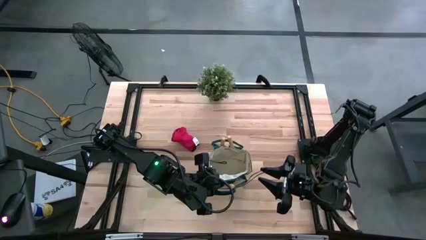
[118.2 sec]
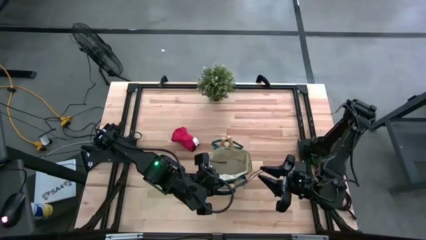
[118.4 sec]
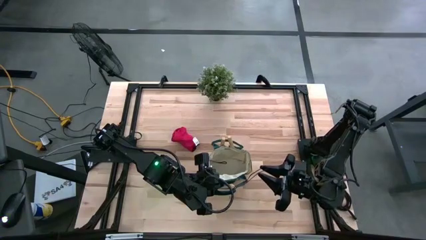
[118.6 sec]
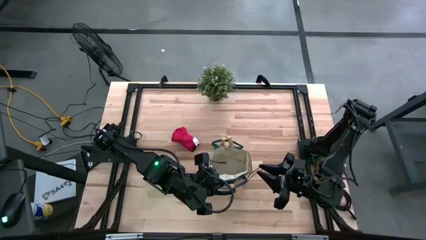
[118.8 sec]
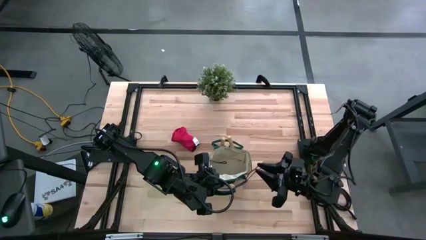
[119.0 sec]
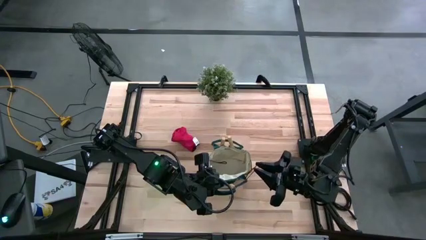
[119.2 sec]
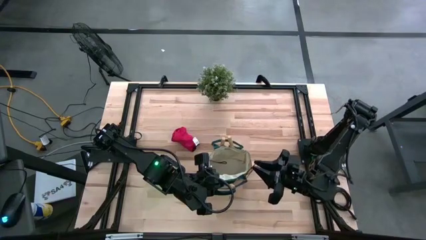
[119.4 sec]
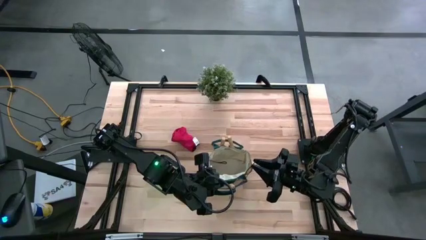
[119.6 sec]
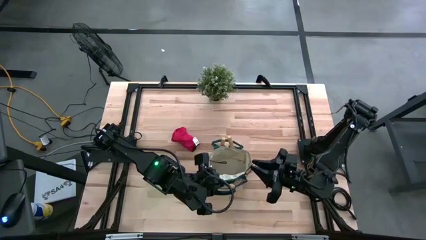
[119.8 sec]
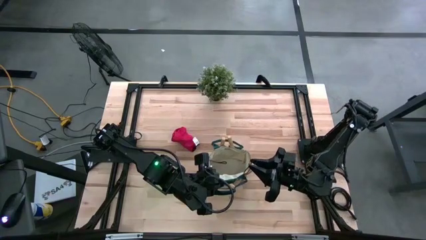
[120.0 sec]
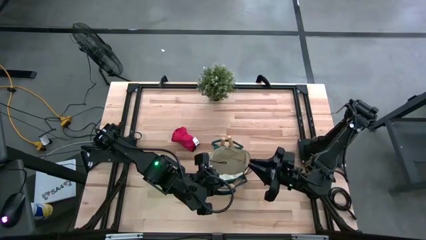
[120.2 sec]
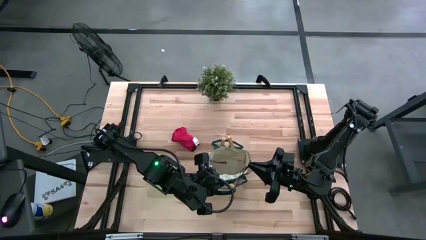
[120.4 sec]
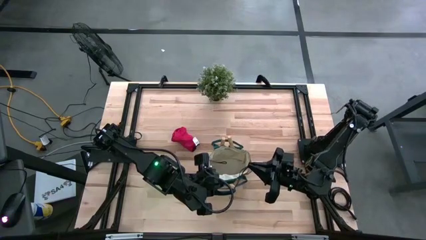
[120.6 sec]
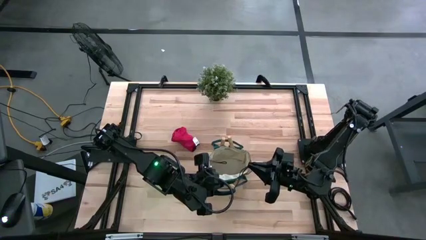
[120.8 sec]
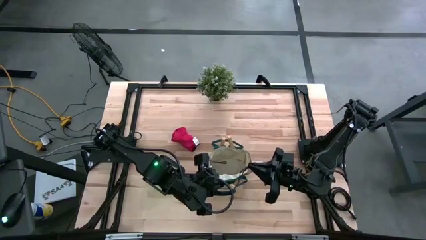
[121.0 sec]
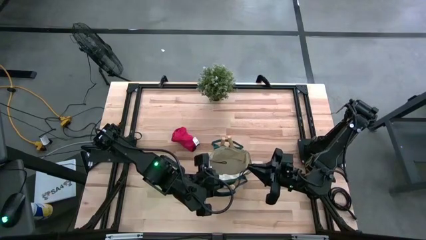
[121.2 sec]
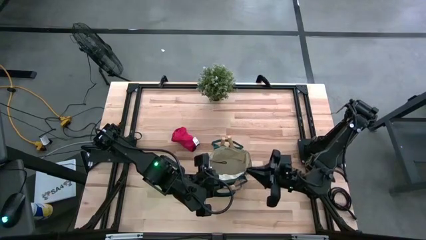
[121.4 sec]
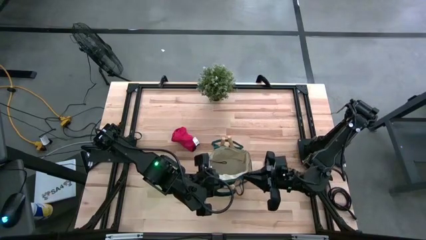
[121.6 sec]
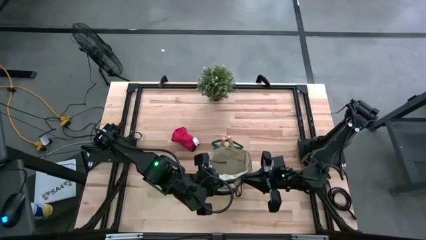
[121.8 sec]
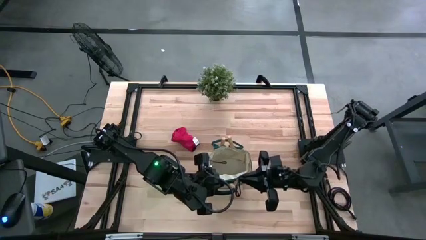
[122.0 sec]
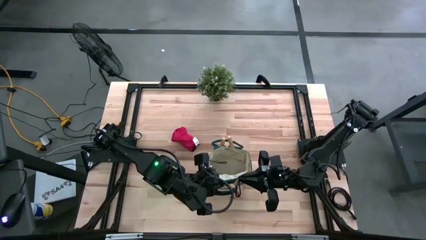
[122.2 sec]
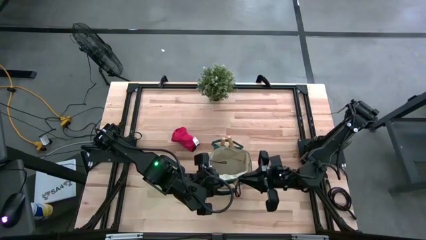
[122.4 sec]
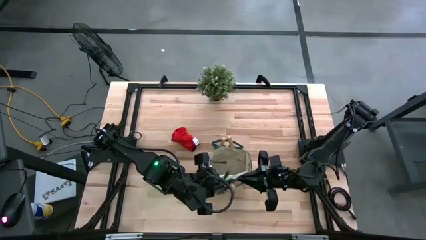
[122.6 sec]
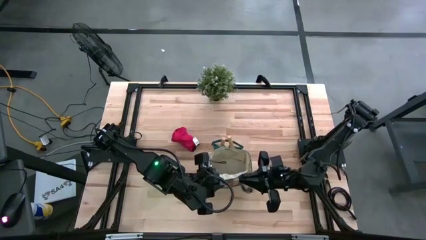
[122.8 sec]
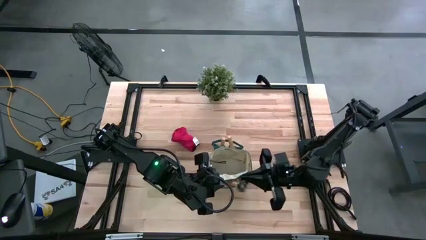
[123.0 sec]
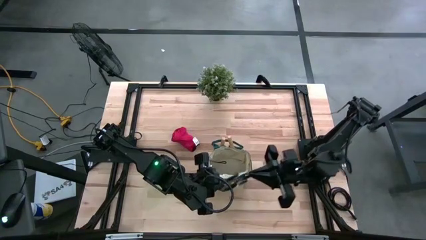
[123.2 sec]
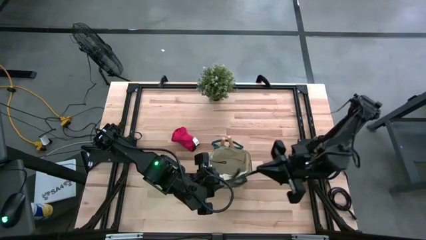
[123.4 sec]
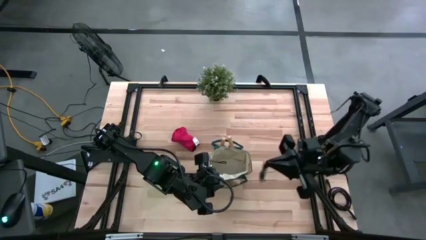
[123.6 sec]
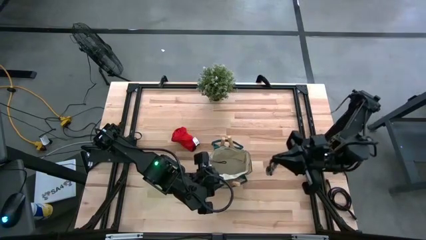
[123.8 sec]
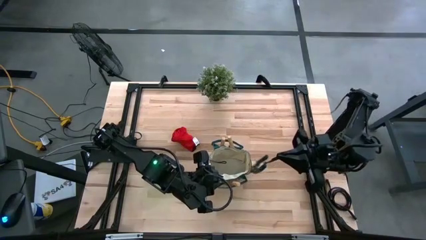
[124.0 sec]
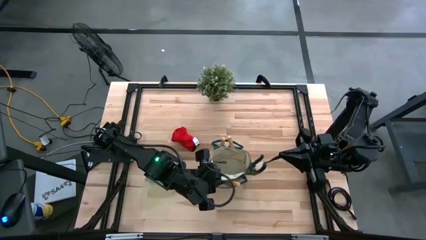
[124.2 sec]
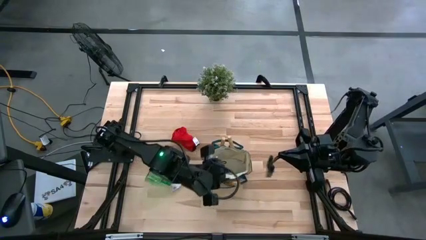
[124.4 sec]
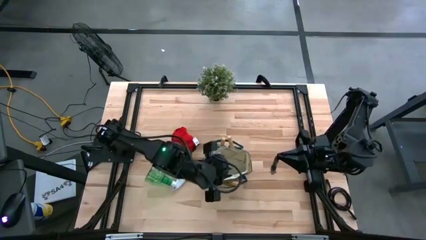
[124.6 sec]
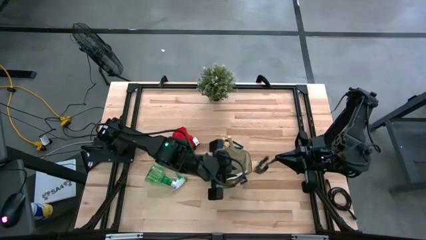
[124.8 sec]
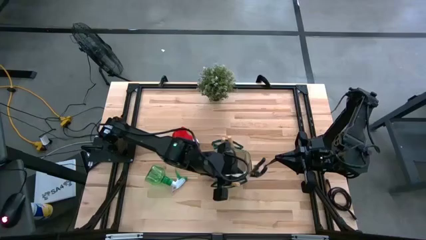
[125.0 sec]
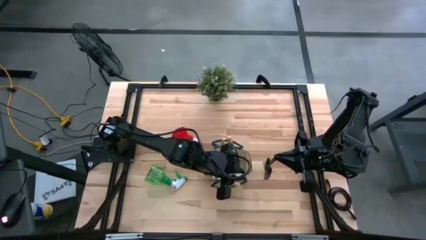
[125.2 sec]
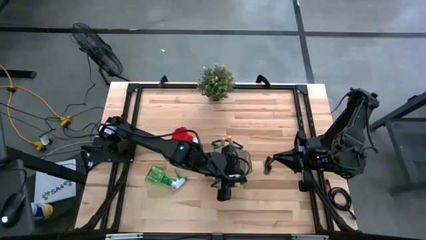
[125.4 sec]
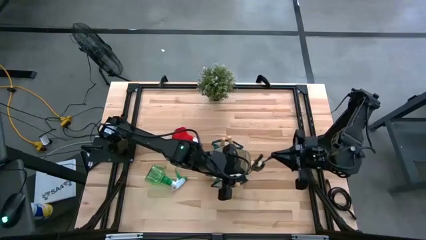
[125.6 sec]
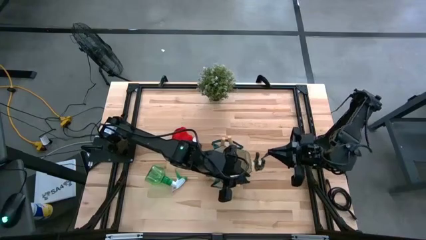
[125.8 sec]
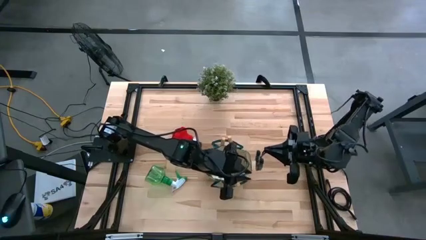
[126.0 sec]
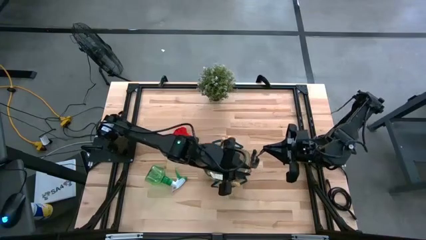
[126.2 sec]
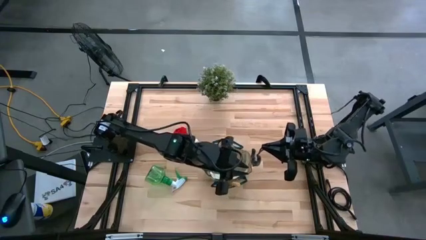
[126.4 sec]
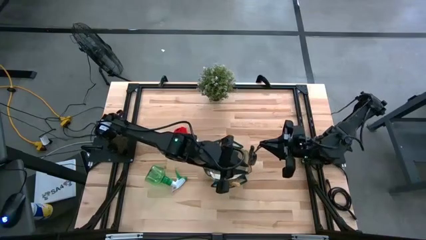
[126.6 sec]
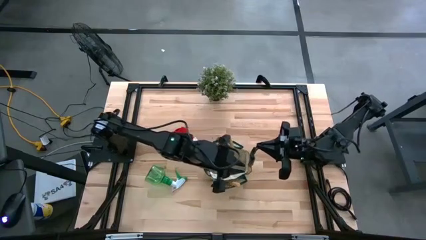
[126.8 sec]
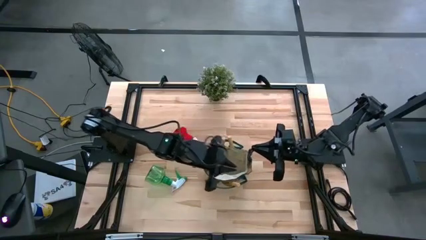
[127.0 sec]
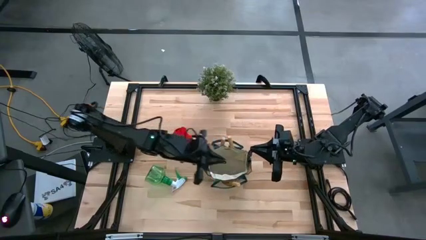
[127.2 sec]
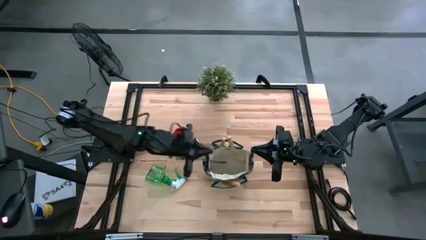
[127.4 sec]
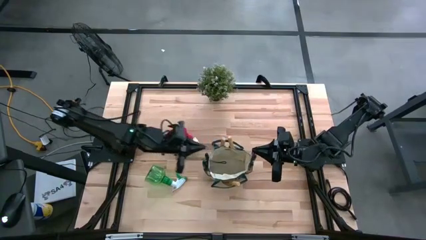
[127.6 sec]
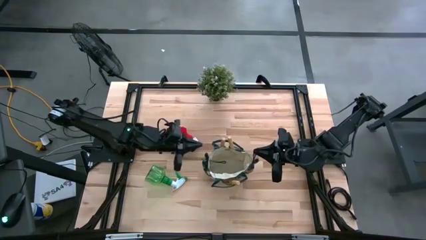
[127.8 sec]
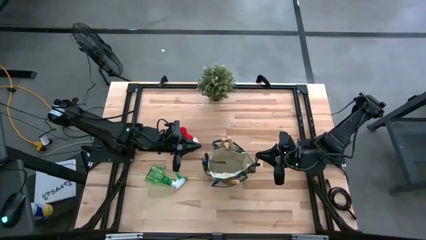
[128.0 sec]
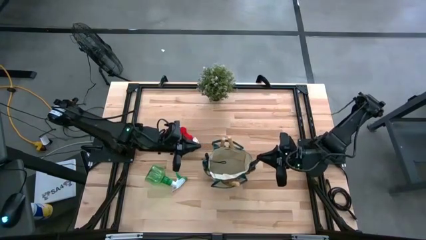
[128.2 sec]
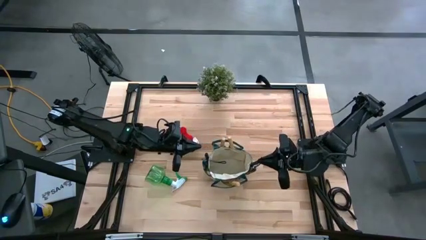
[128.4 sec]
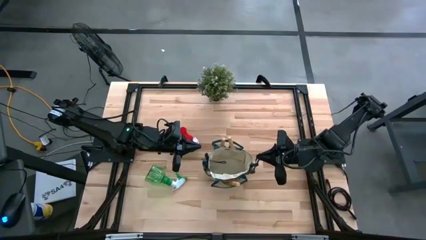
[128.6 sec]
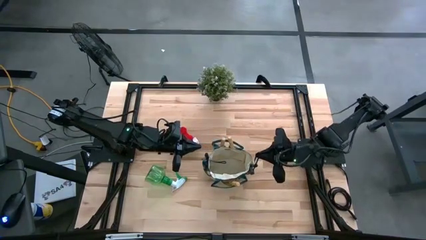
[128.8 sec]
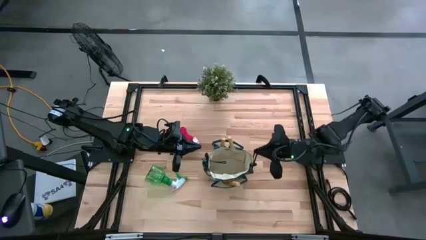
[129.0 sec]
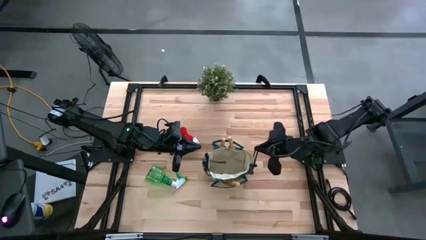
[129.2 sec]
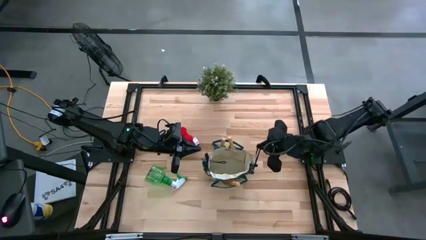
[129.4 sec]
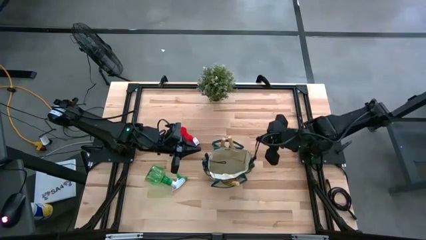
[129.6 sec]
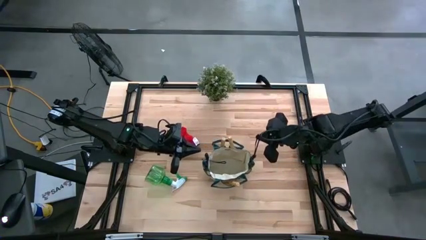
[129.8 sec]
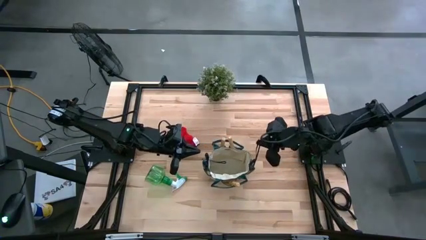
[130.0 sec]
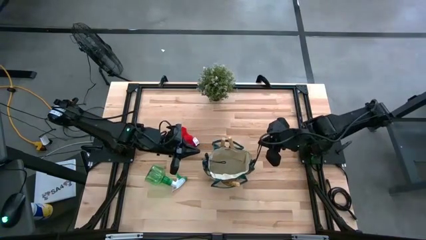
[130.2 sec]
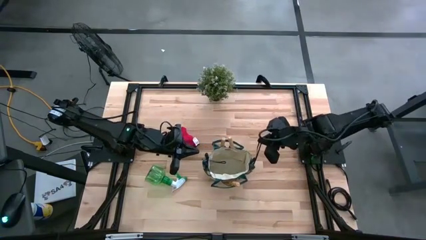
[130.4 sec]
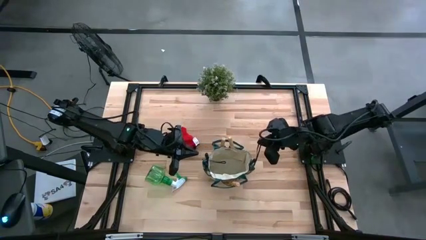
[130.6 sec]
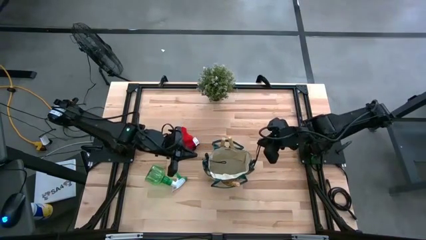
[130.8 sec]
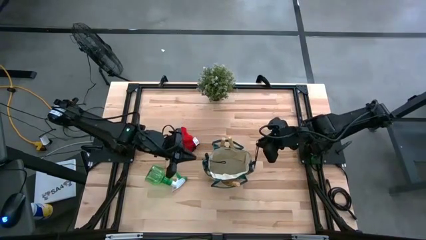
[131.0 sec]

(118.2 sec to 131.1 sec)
Task: Pick & Place Garden tools in Gardening bag
Put the shear scissors into the gardening bag

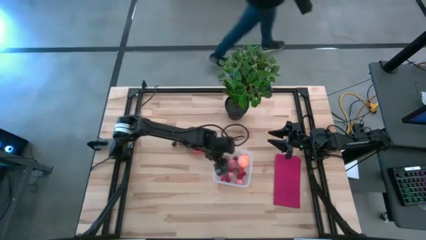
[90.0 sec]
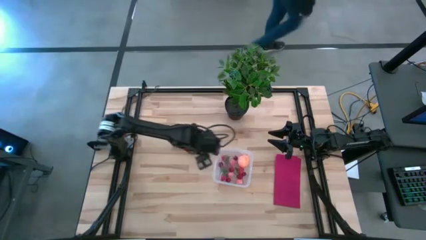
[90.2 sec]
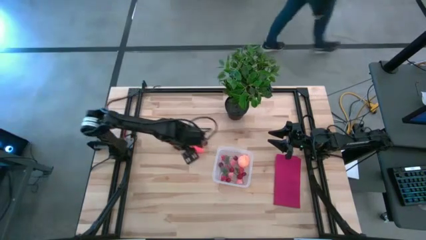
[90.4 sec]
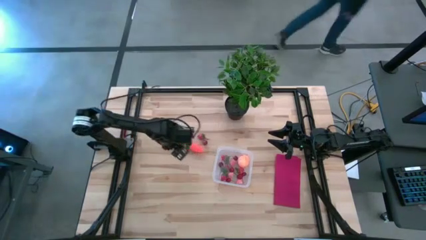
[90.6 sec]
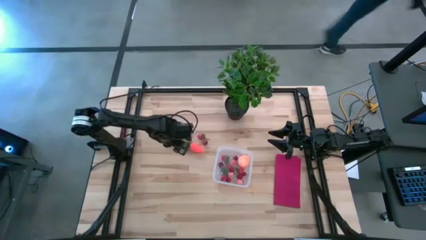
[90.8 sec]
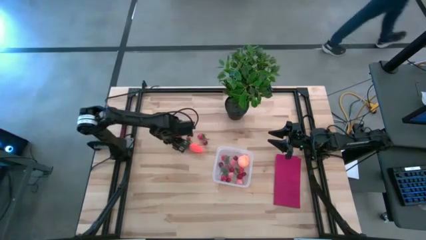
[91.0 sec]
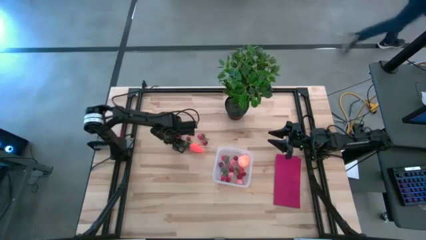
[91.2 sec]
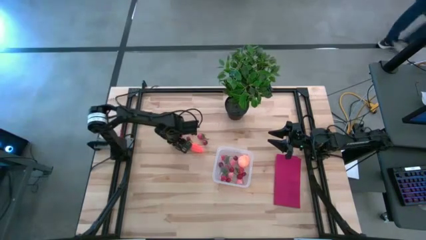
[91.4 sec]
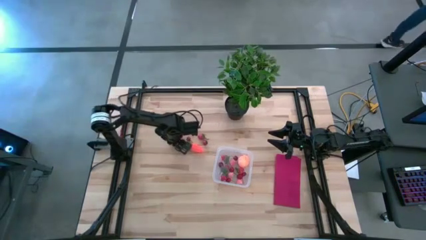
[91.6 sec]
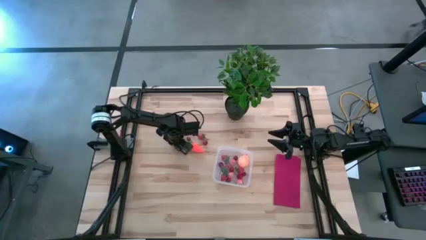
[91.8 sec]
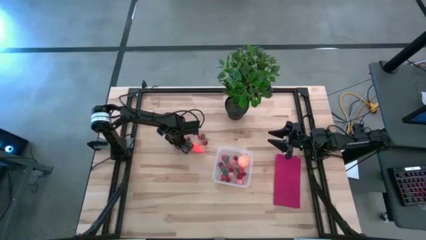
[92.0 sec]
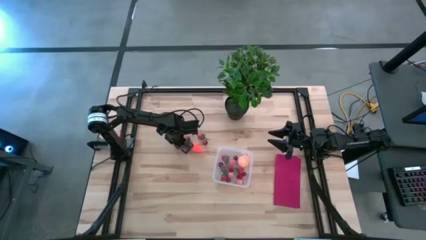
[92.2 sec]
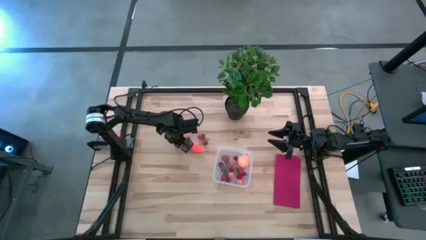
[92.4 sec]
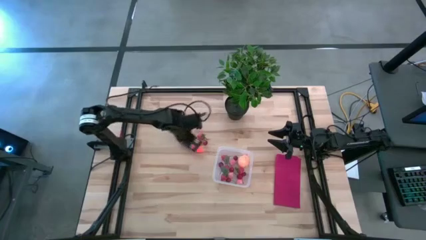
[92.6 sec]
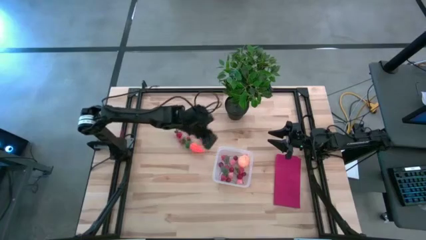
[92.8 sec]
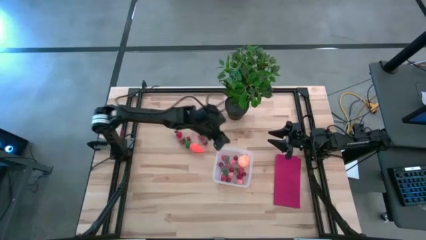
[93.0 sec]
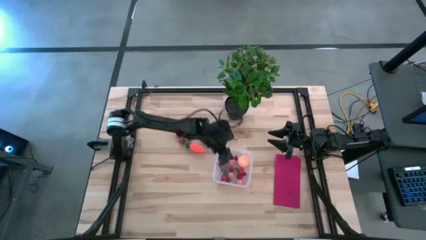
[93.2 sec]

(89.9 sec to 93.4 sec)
Task: Pick and placing Produce into tupperware
Put the blackberry into the transparent bin
